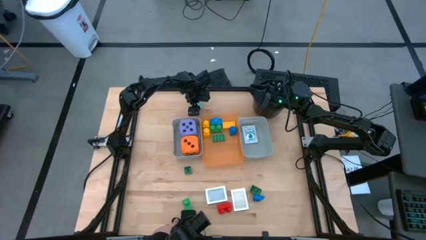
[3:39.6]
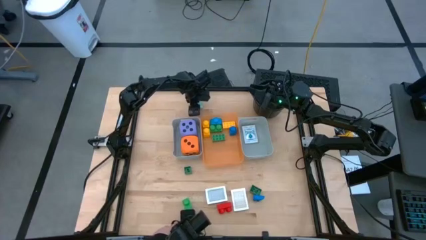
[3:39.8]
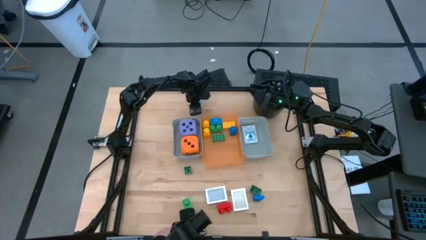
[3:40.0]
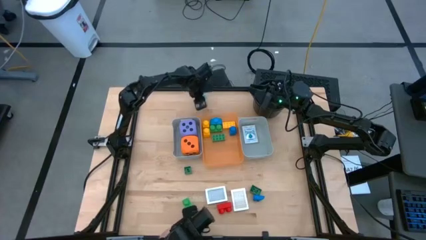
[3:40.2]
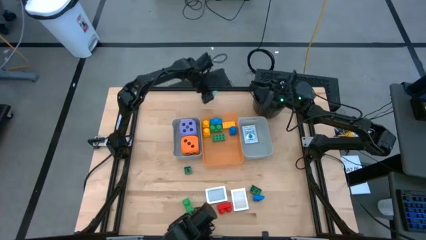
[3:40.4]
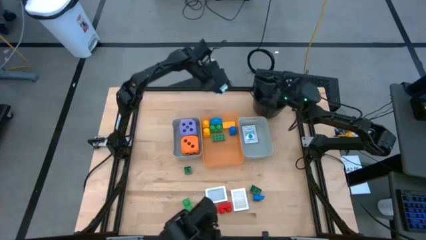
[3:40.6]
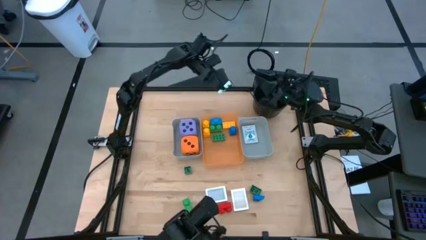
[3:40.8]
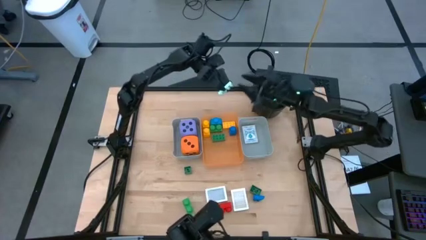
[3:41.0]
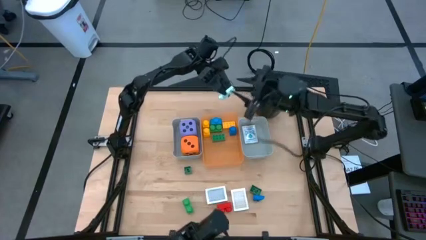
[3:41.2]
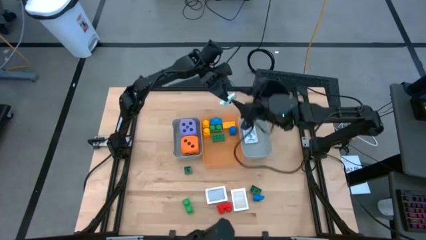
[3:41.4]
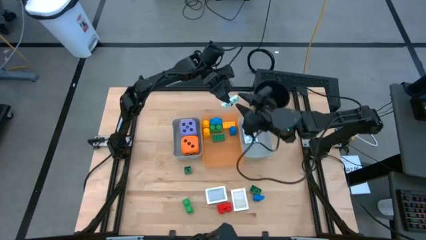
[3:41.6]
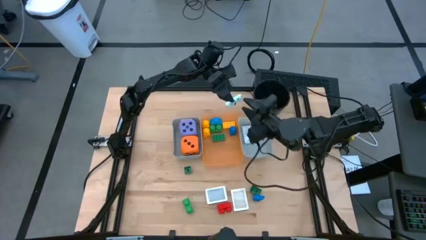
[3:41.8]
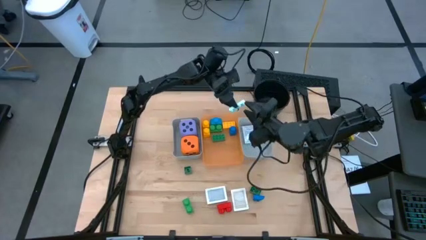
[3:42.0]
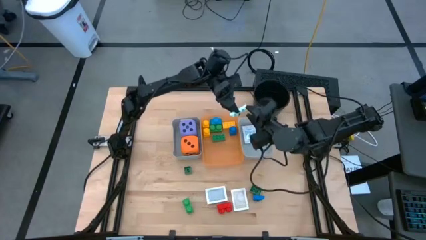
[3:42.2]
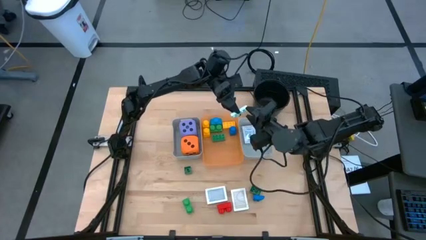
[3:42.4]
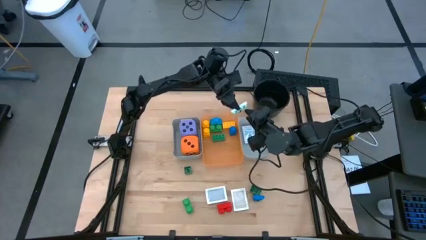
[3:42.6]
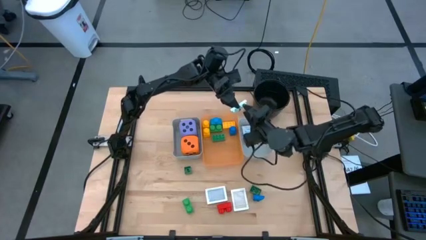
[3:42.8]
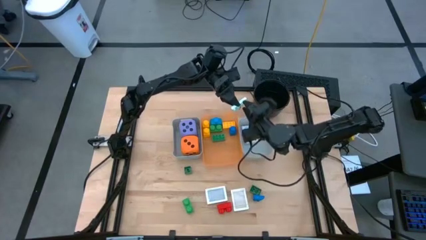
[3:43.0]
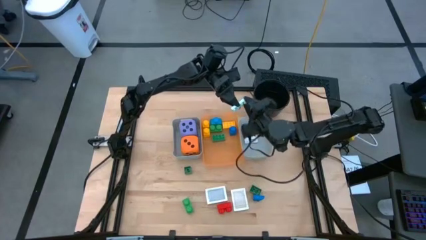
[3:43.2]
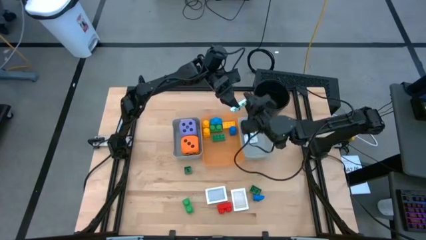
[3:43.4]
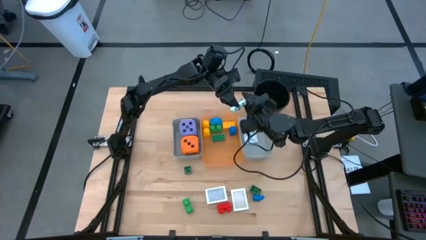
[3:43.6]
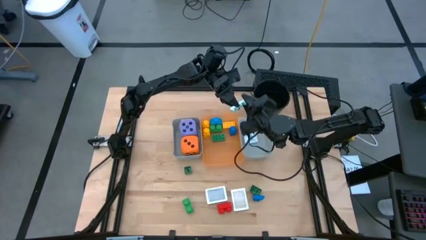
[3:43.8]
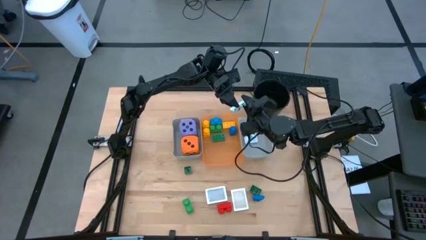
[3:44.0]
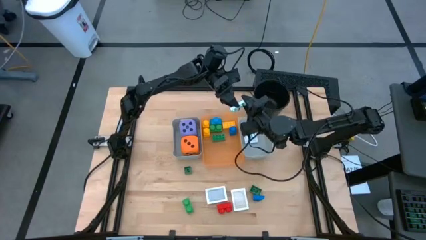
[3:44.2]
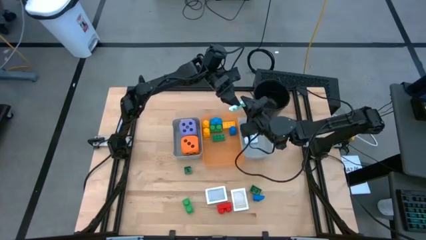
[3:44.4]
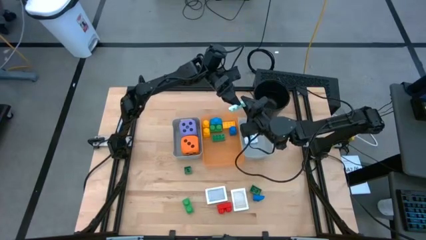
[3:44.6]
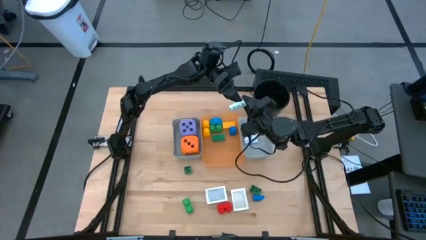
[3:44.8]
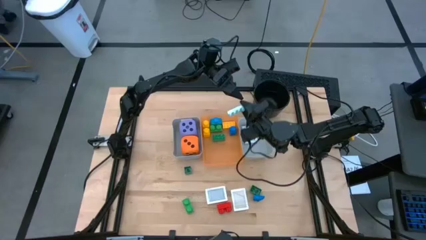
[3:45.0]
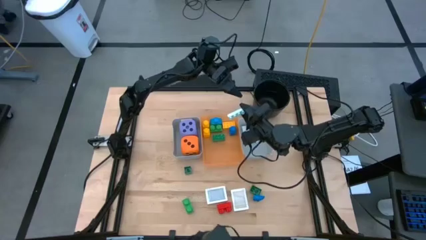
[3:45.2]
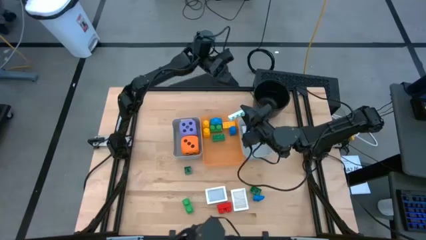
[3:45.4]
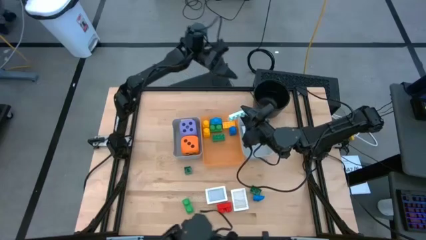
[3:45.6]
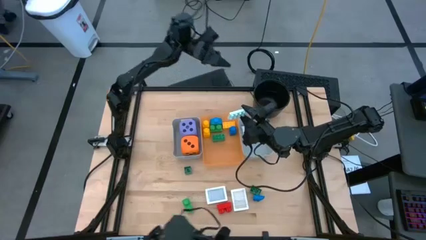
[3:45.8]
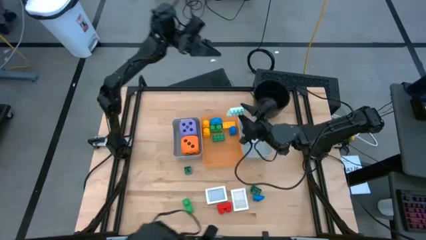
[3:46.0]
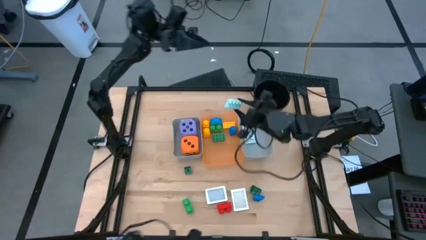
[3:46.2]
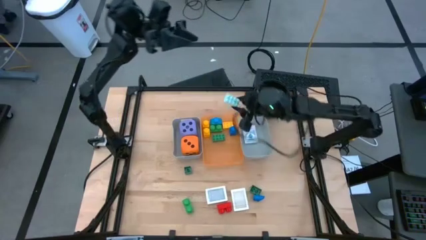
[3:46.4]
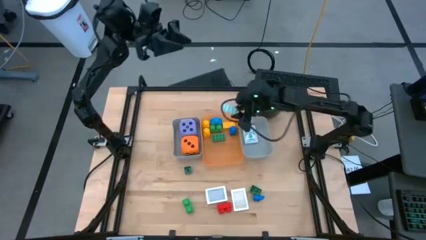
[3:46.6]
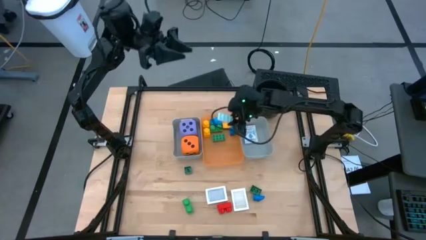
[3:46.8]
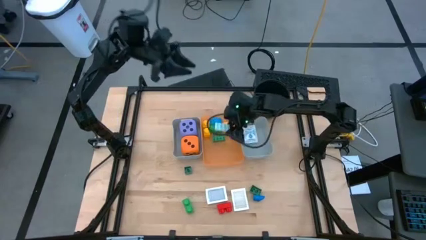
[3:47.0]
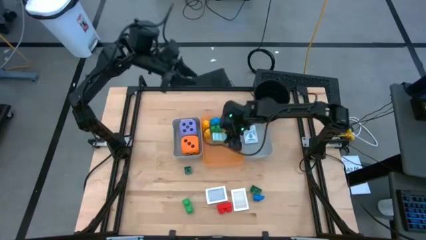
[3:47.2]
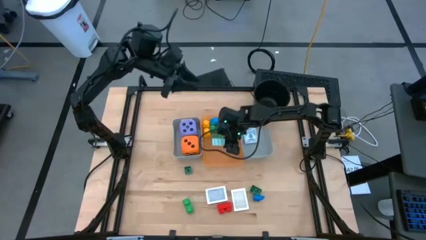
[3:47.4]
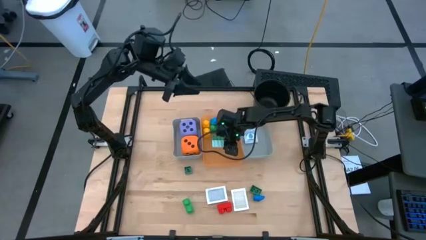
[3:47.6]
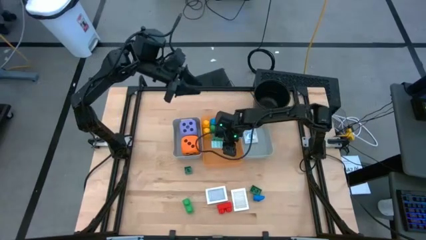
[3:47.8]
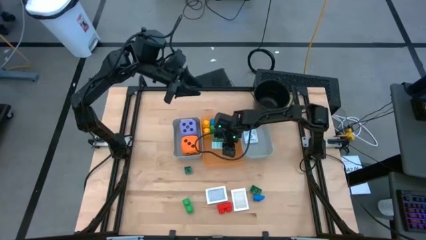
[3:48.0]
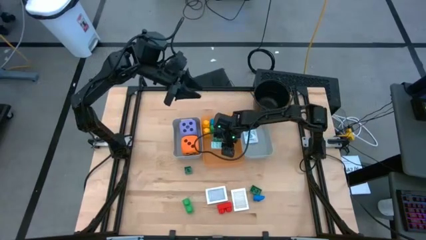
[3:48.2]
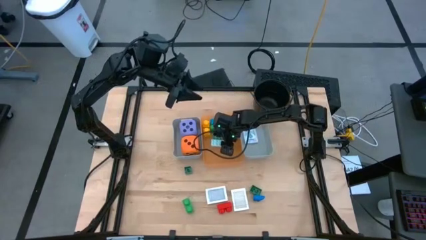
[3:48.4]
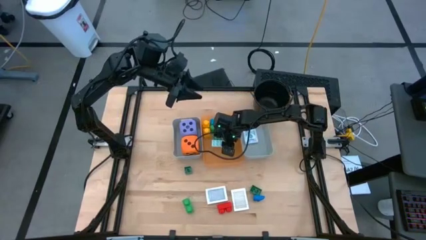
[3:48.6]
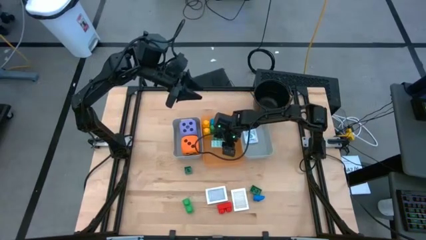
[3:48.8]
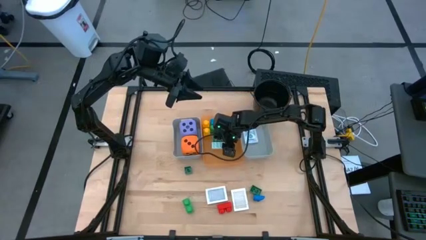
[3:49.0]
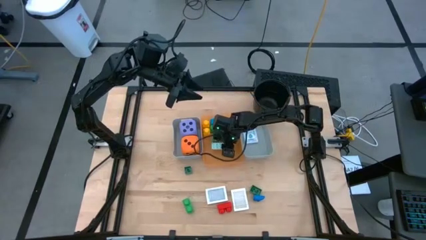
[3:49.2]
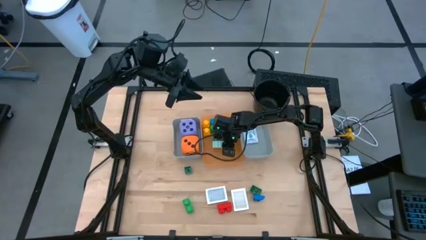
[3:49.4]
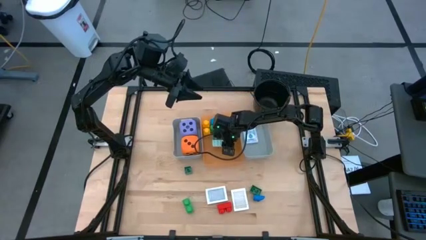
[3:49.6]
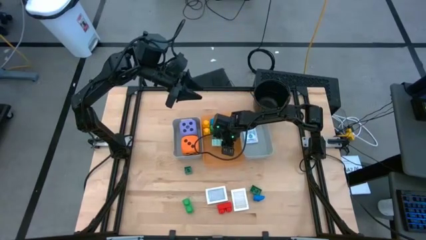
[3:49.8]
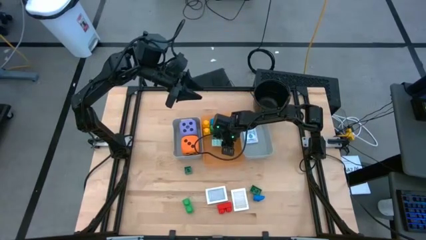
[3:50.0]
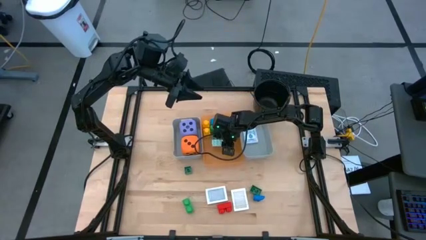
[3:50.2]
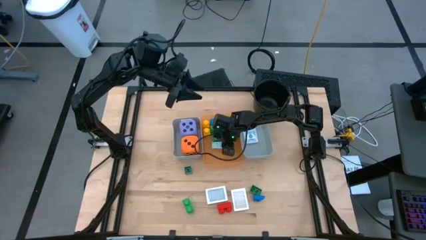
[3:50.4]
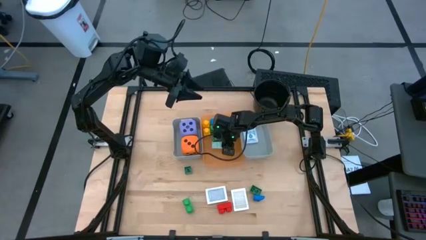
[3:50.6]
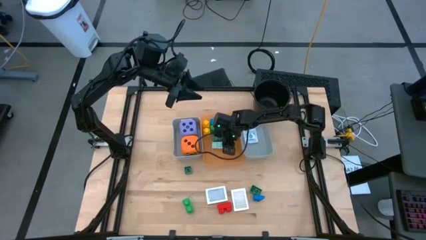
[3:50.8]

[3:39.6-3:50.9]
Task: Pick & Place Toys
Put the light blue game piece into the orange bin

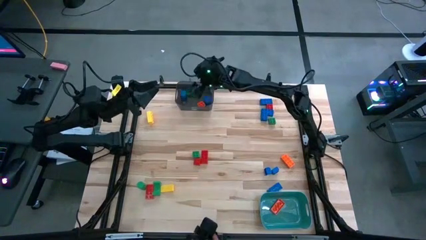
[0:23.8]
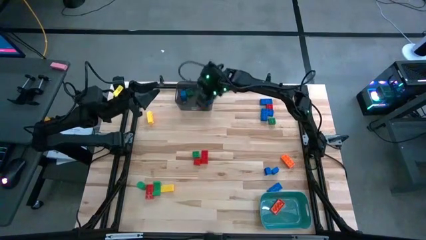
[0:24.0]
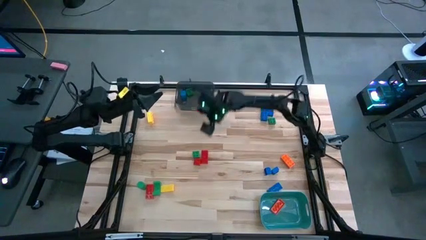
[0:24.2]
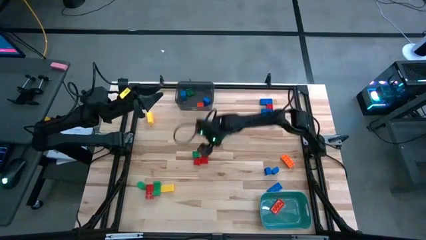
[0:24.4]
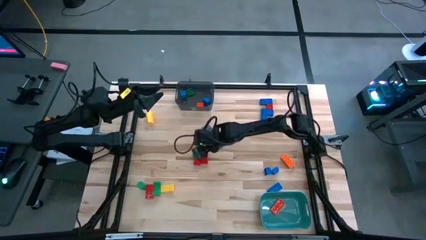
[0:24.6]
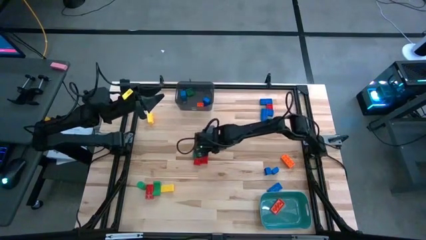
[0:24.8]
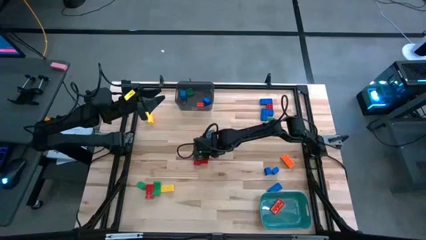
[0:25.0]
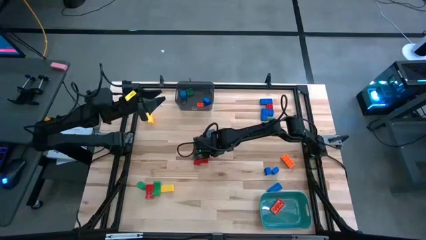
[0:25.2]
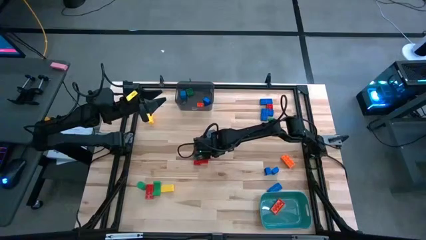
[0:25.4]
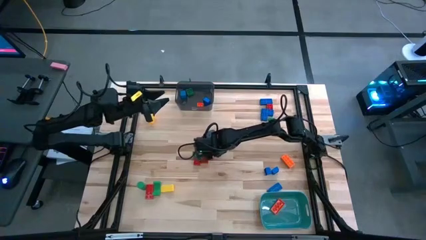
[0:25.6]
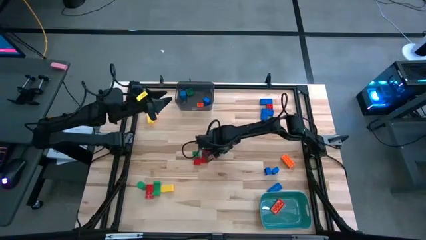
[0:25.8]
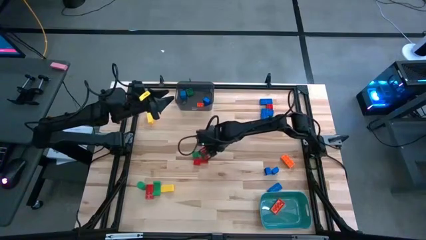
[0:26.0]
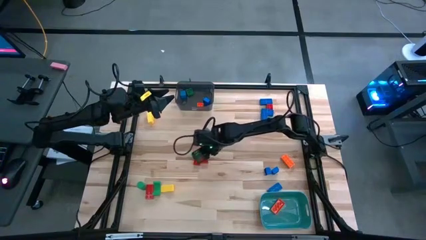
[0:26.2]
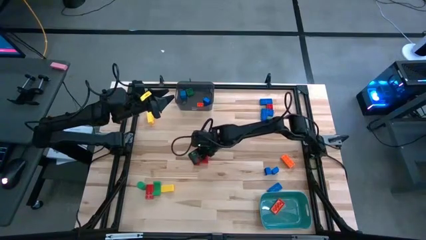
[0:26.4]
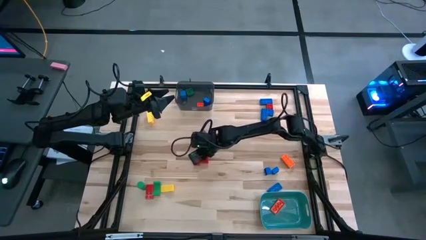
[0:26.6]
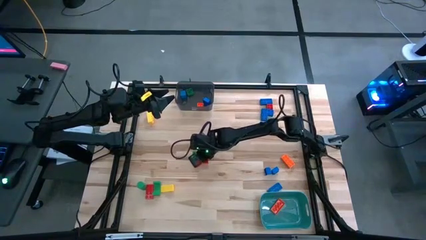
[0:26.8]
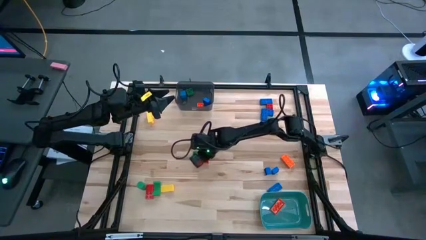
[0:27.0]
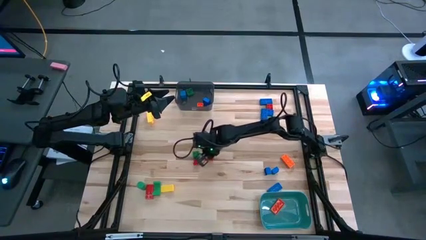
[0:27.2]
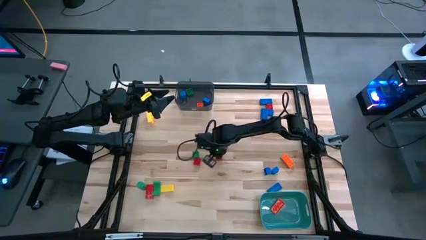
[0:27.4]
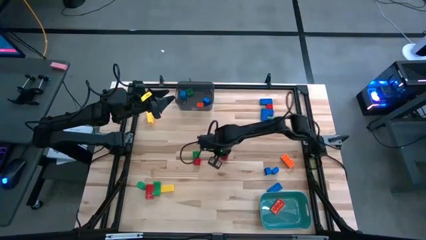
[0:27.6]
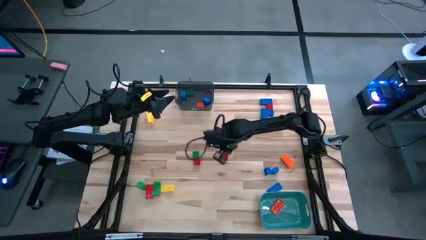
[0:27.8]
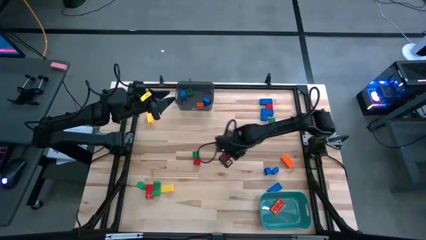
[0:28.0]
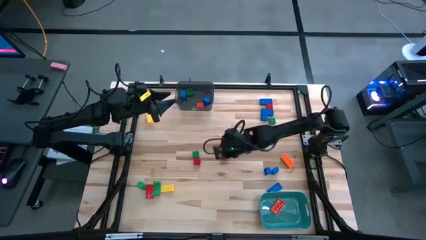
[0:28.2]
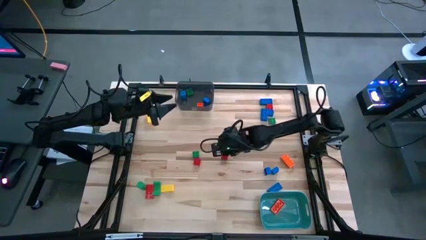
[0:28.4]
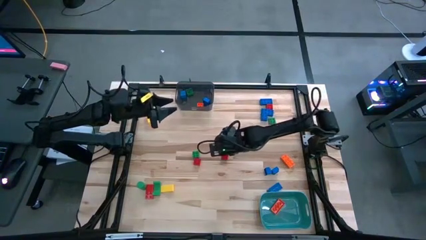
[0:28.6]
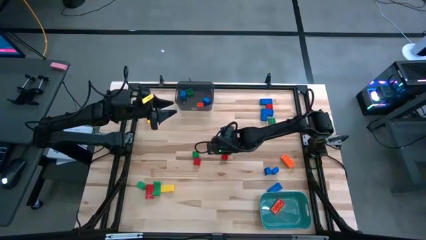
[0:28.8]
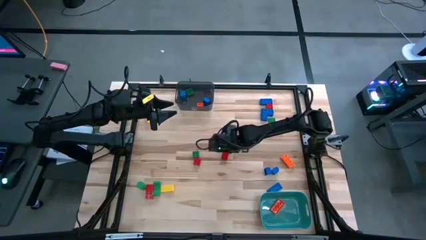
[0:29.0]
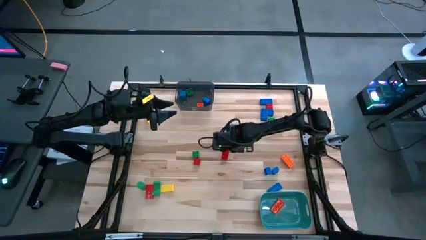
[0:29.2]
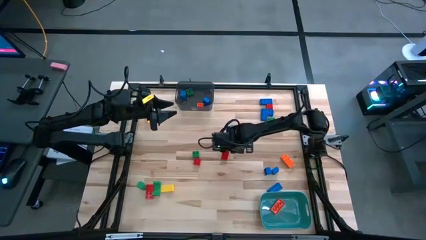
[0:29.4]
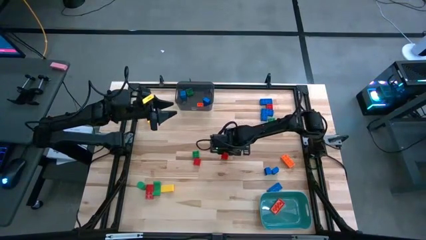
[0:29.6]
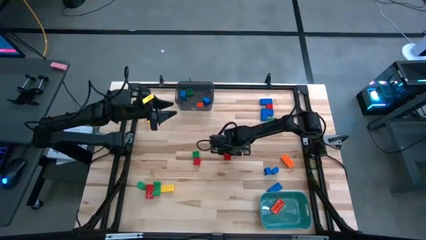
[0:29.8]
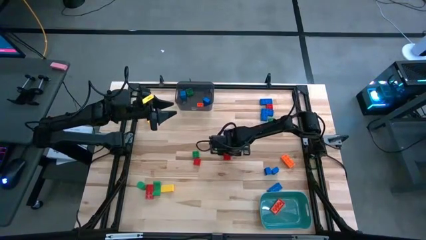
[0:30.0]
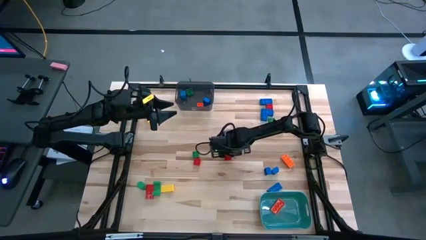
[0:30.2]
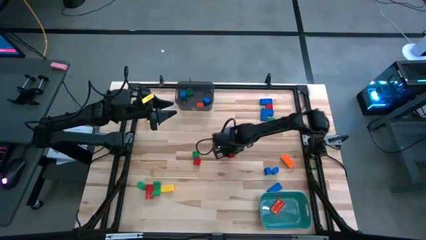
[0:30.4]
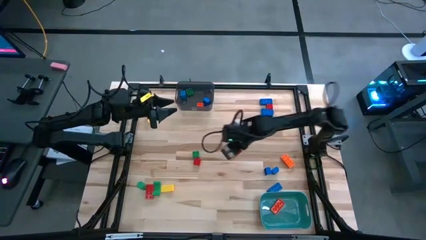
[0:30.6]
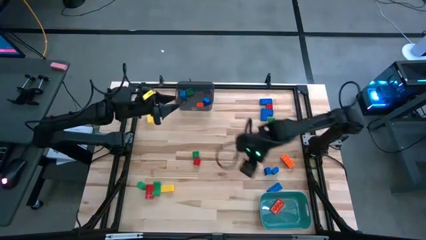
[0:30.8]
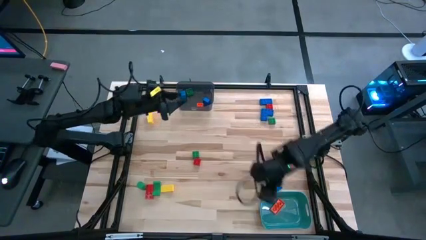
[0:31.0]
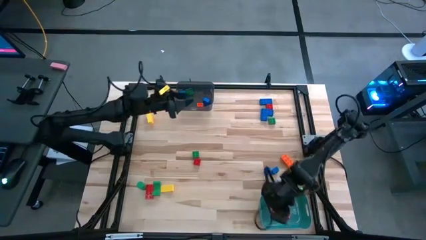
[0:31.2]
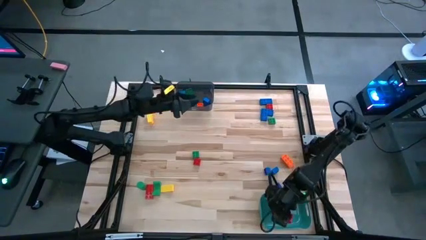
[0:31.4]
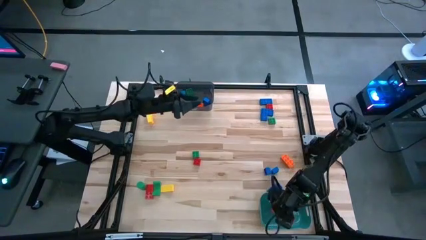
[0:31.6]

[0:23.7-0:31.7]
Task: Sort blocks by size
Put the red game piece into the green bin
